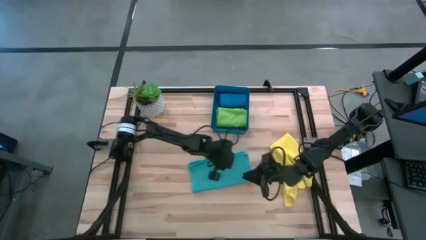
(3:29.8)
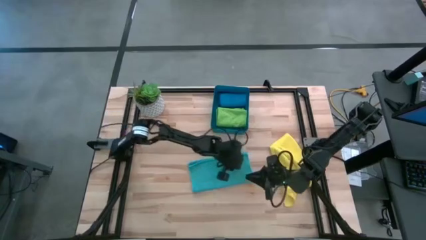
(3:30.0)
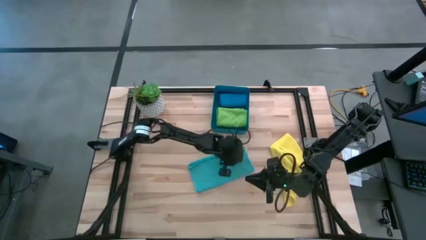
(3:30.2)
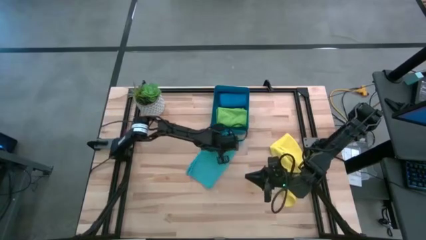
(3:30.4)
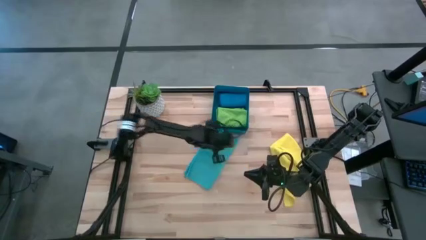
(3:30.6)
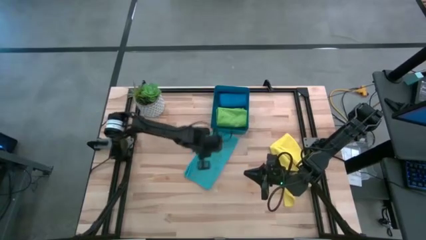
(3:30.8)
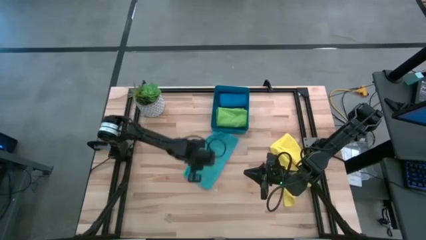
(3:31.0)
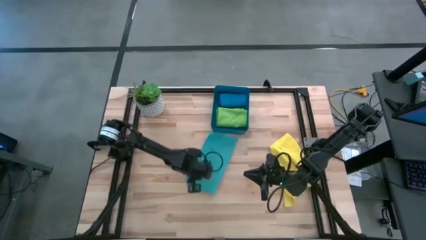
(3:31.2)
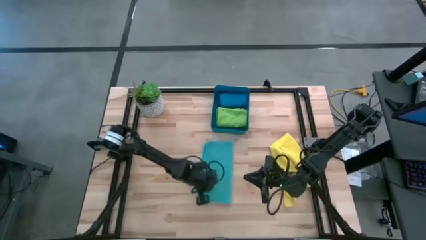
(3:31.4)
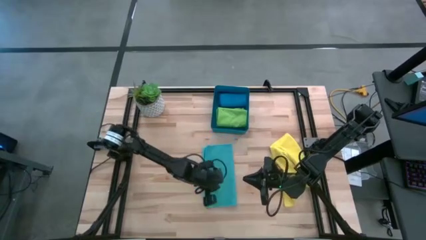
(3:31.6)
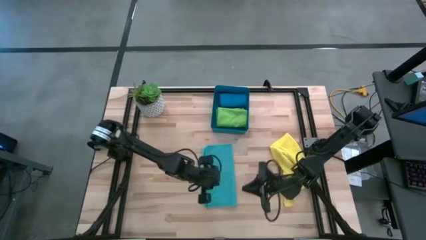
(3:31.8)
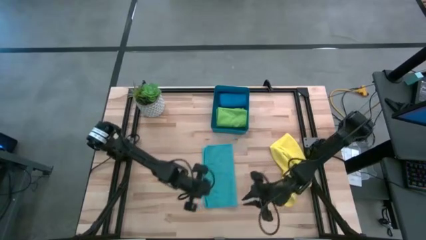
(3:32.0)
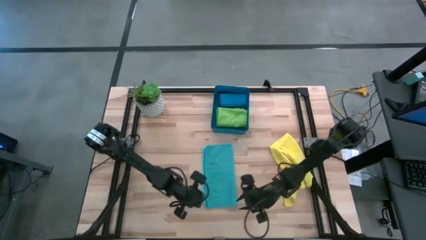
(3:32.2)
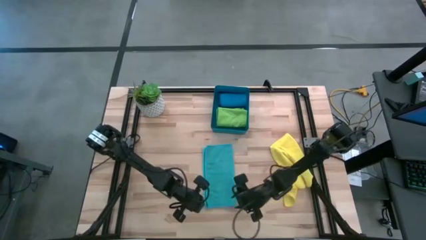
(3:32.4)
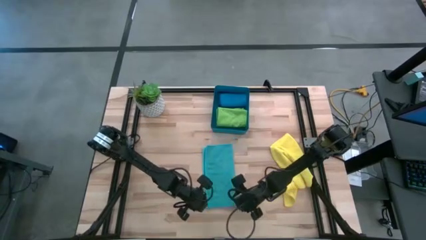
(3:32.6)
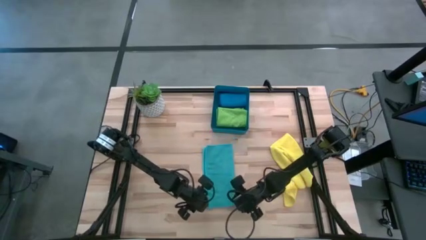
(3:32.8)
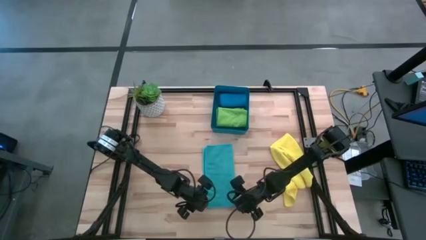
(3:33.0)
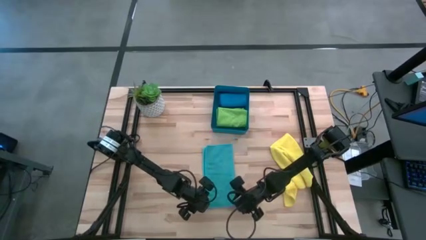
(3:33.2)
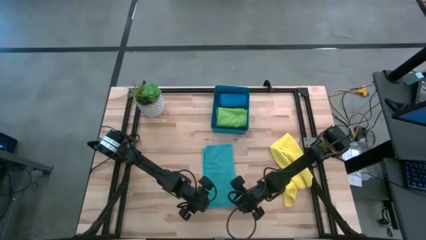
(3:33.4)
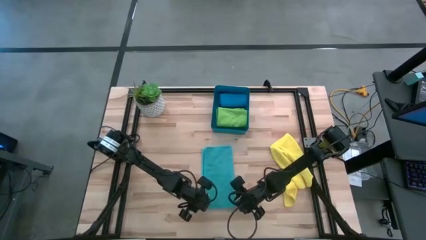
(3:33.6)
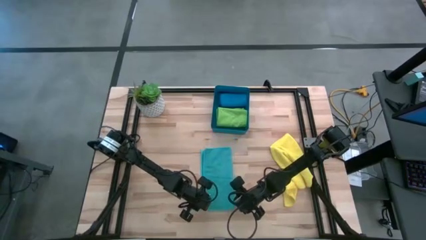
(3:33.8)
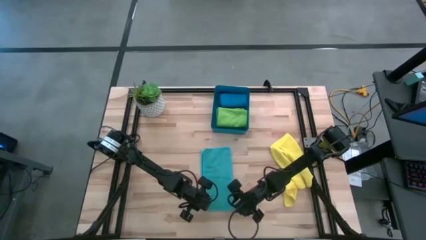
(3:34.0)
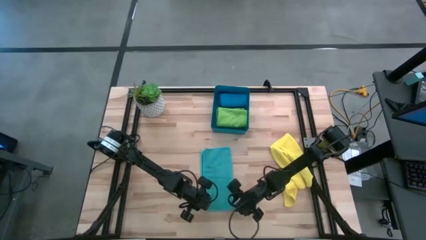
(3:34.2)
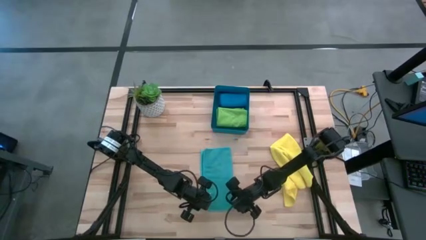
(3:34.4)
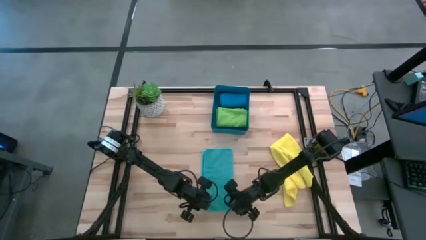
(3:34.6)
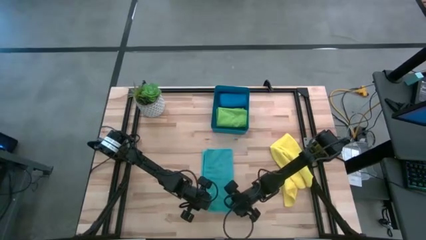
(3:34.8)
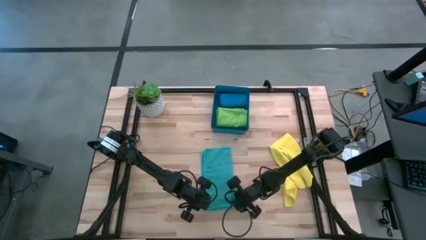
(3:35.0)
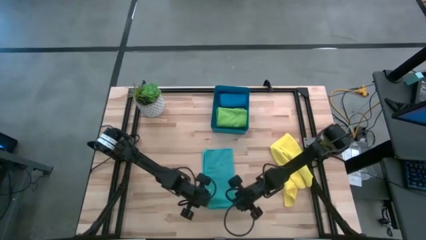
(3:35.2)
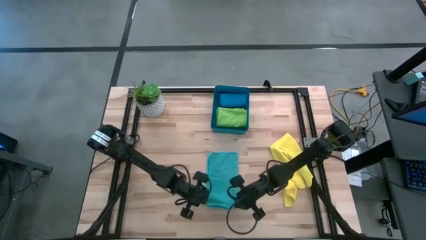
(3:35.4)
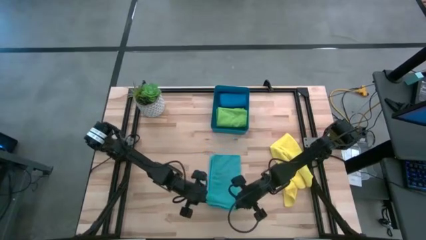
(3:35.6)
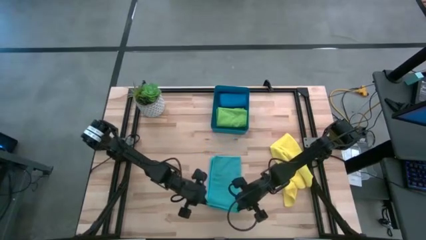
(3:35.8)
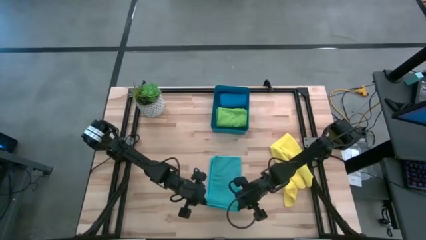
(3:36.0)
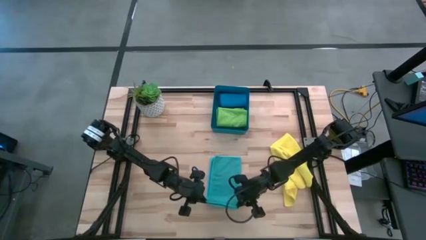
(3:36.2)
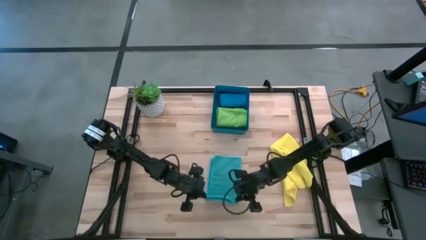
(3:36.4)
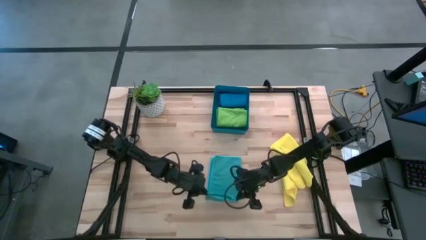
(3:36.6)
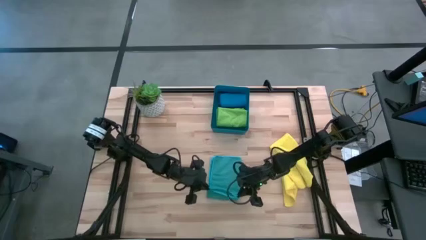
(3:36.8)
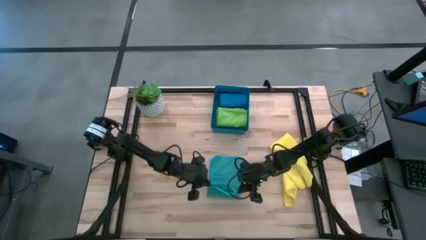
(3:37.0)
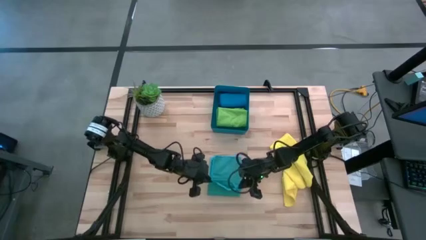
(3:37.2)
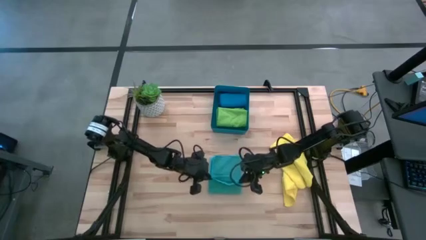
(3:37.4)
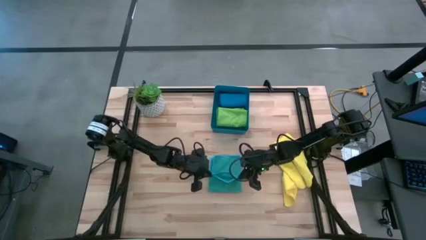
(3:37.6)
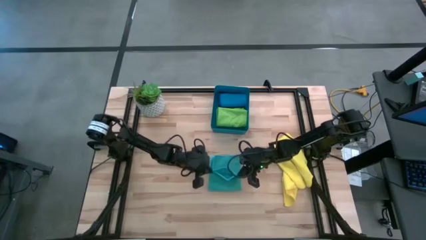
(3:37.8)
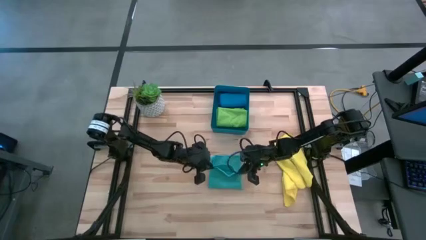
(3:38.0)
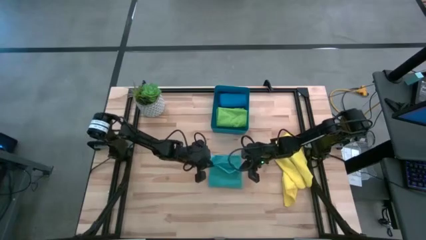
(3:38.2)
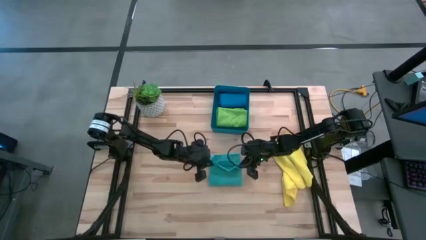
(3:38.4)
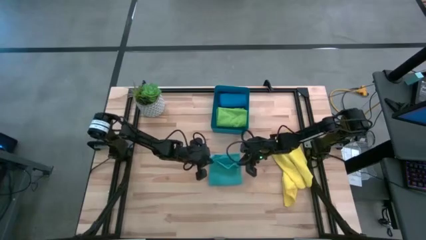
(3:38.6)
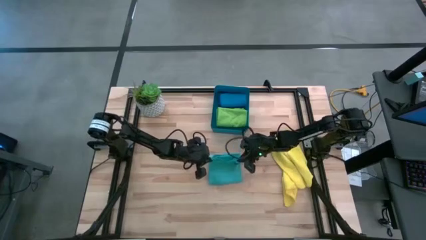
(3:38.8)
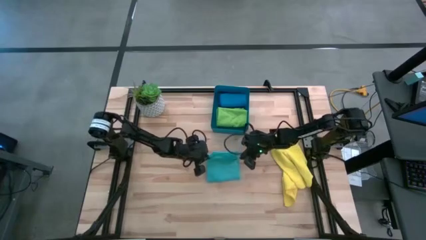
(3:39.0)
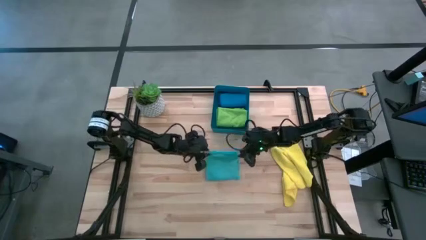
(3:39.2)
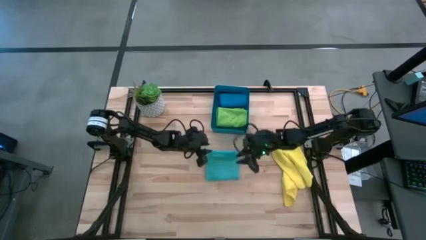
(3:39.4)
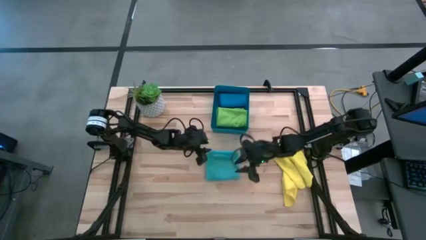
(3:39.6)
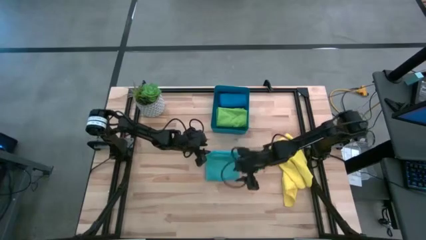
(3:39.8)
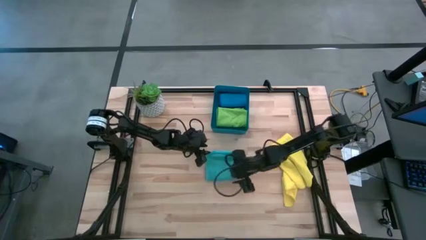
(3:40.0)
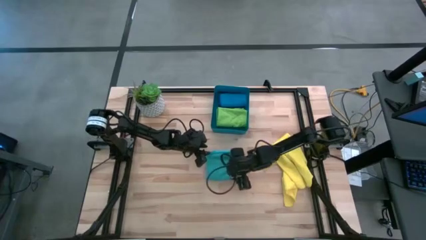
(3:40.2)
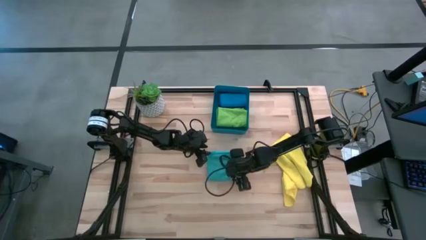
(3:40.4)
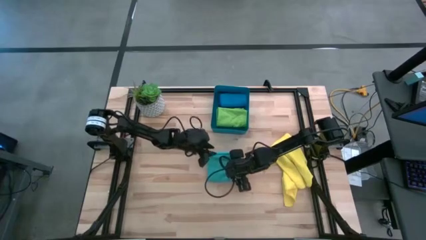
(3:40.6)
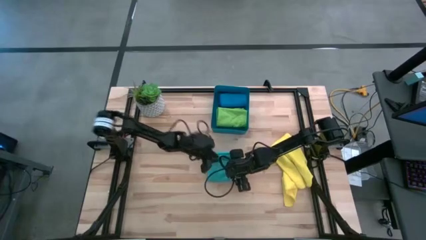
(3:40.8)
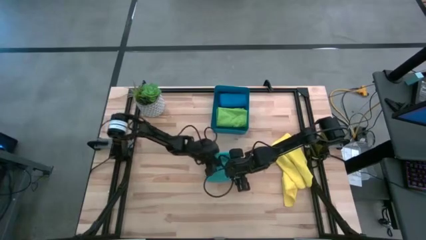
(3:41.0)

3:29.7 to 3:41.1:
Task: Fold microfiber towels
Fold the light blue microfiber cloth

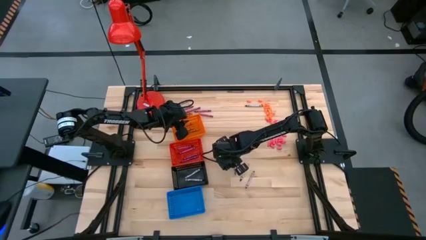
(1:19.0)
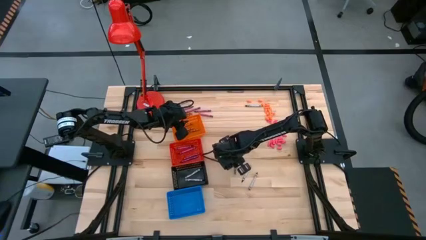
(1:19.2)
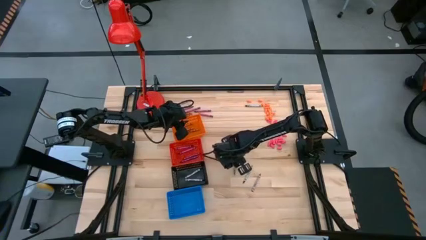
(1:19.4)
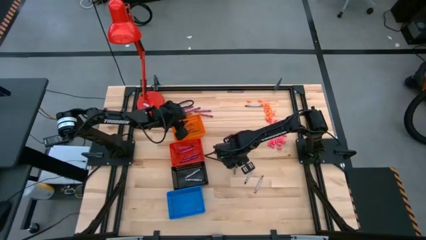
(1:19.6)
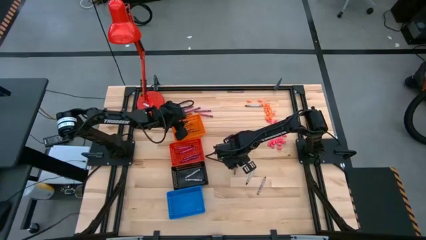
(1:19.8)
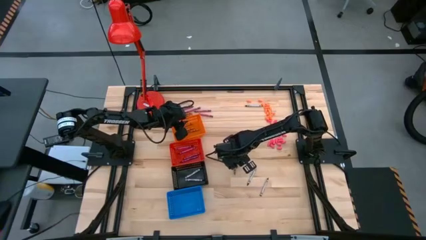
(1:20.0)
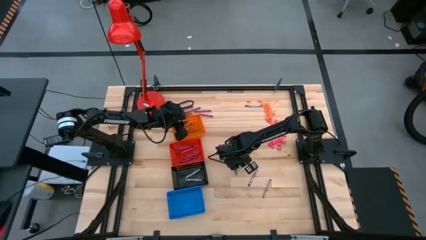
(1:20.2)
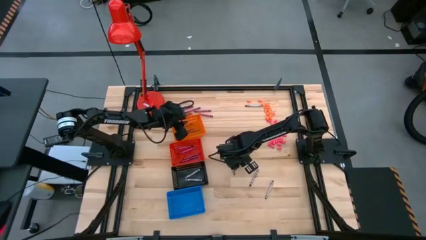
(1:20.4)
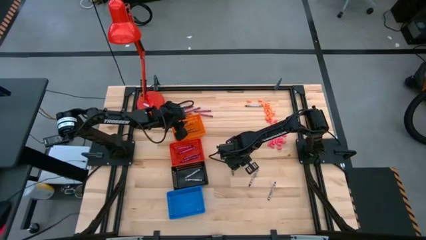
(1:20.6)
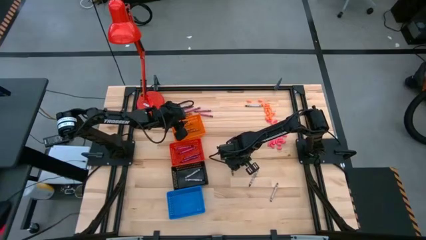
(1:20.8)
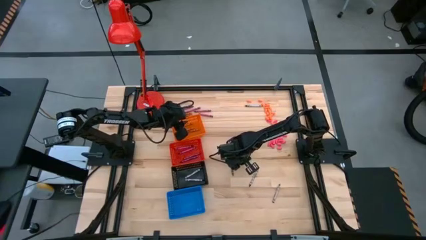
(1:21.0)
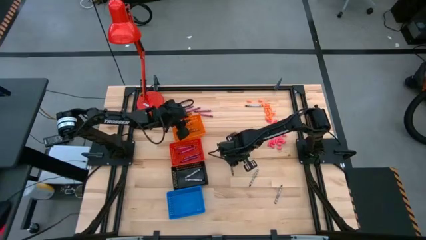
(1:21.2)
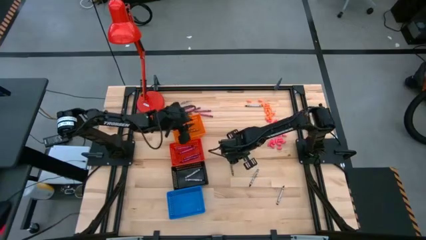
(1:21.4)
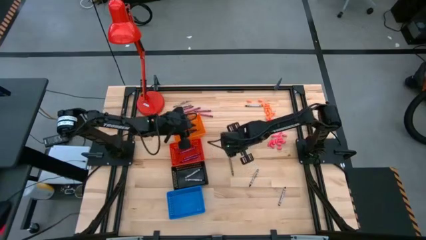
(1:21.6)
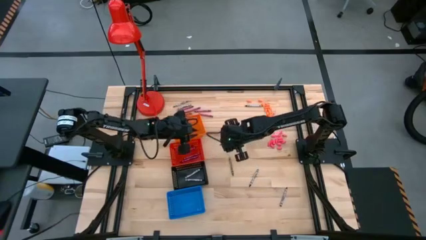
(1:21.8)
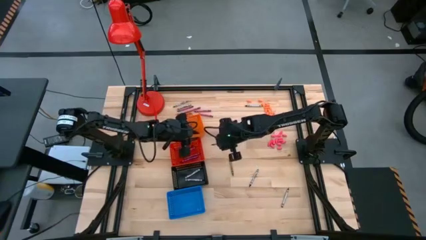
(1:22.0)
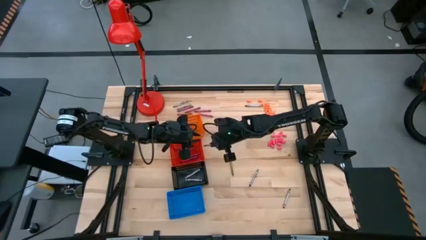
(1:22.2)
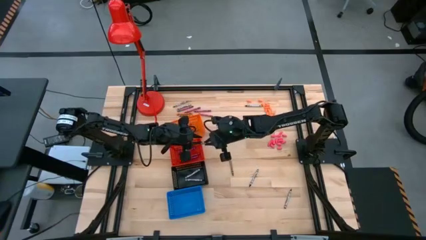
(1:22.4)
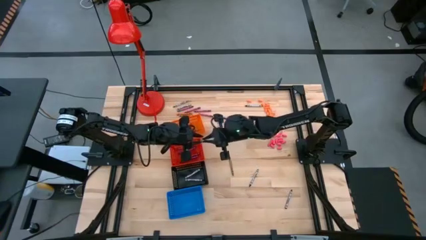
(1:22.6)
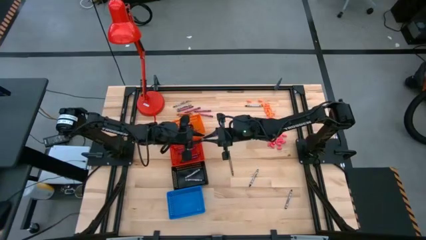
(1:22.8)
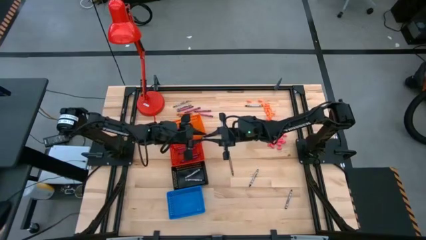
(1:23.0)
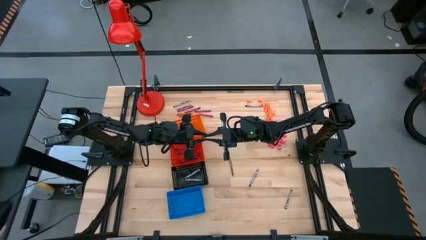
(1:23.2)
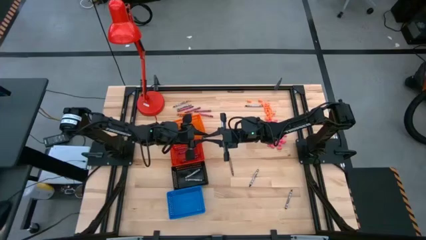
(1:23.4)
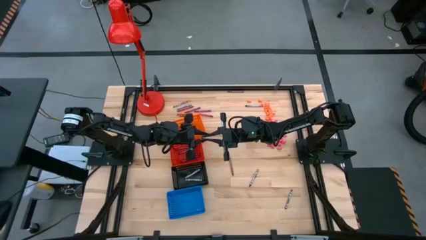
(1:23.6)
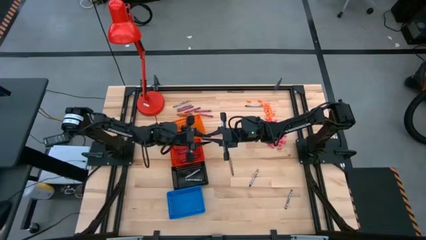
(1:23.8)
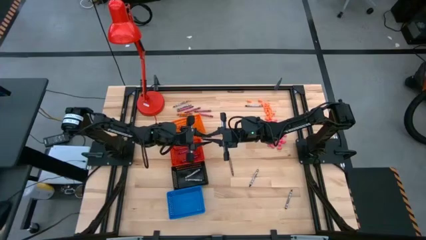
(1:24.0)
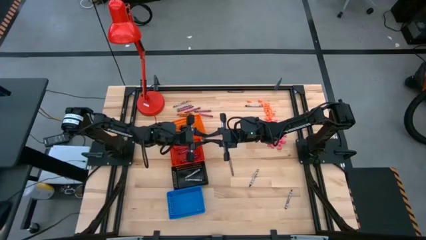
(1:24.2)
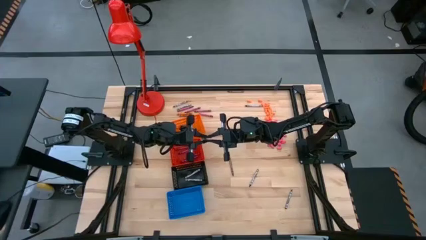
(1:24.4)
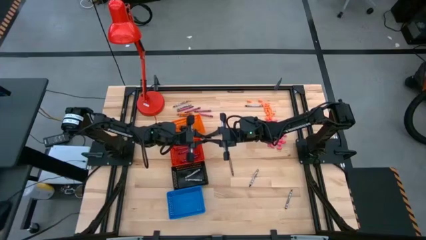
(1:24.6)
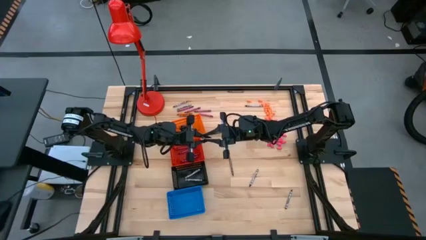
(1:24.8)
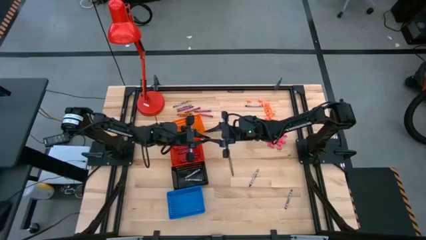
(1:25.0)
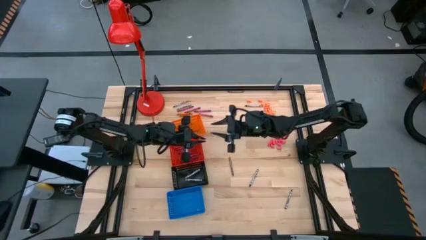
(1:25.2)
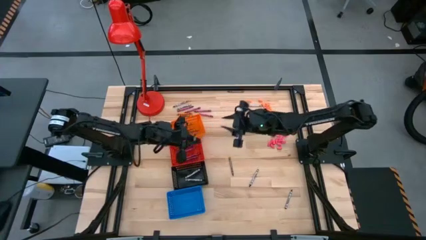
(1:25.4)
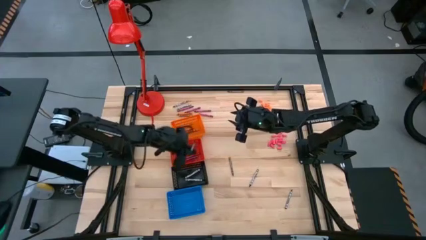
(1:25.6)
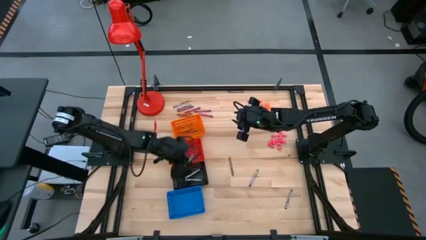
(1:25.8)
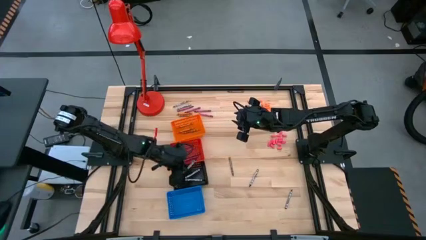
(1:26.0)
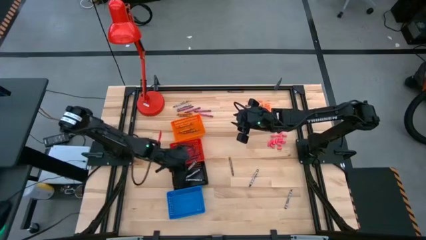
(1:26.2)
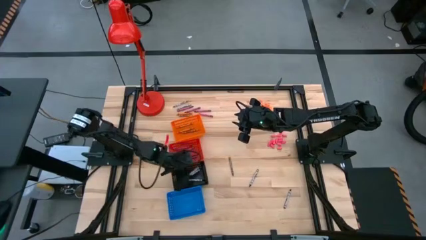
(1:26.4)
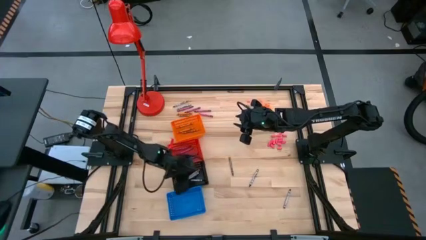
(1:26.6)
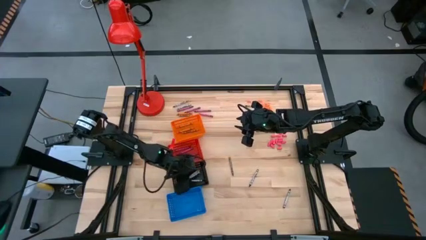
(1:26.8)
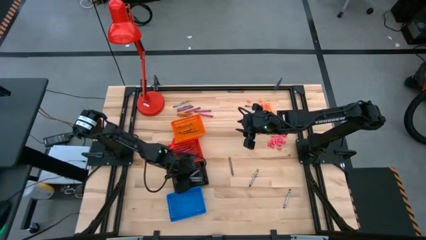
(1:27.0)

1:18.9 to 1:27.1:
Task: Sort crayons
Put the black crayon into the black basket
